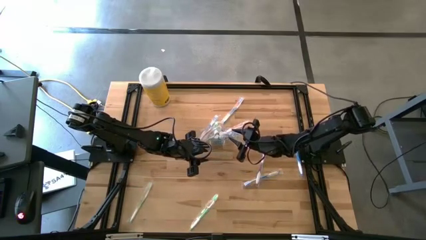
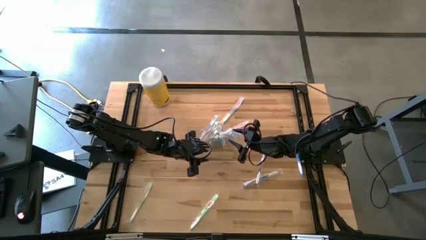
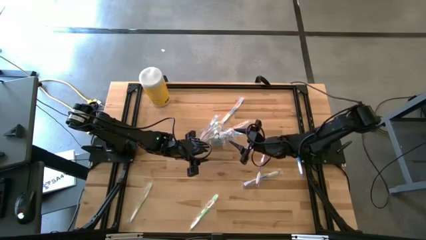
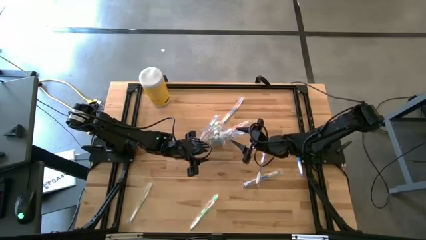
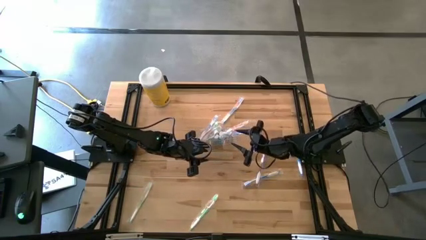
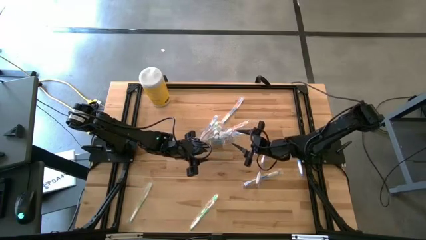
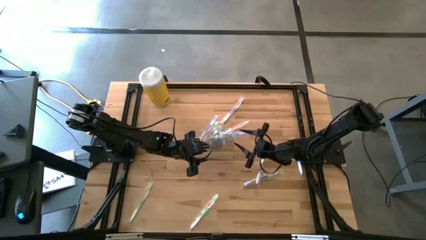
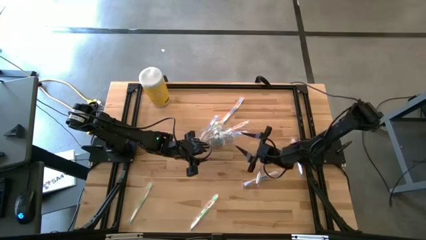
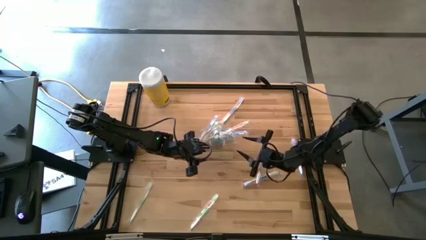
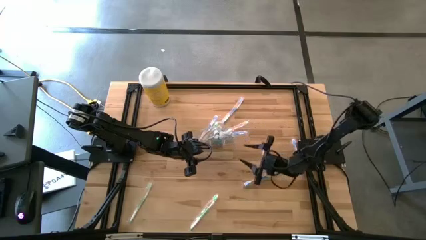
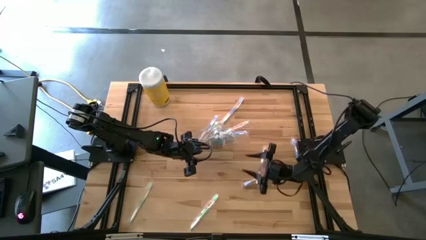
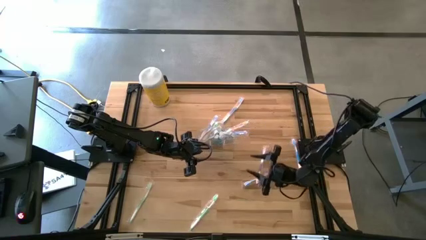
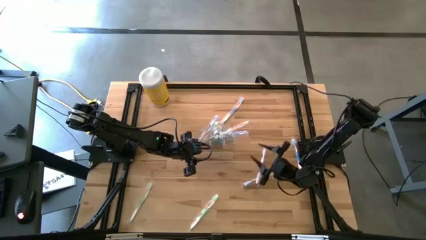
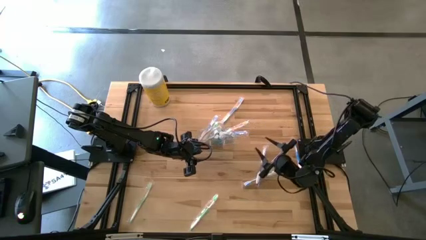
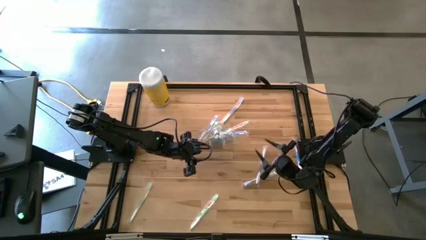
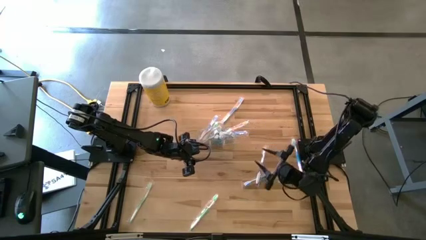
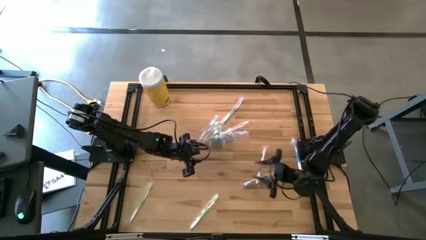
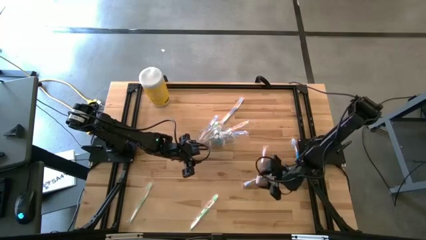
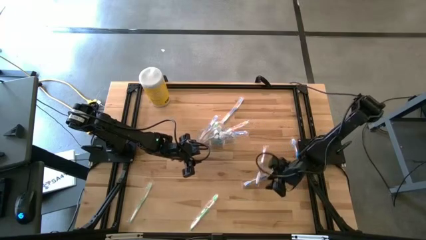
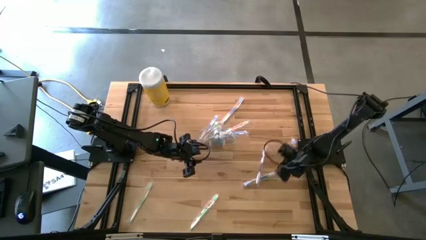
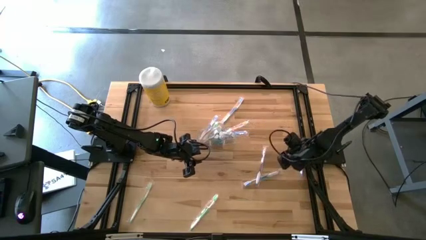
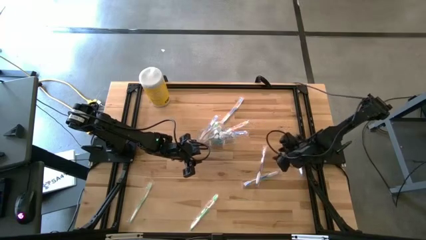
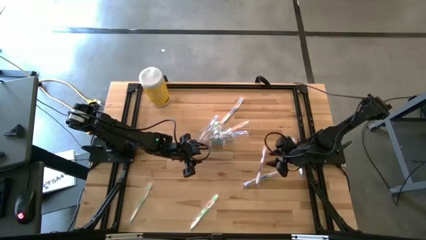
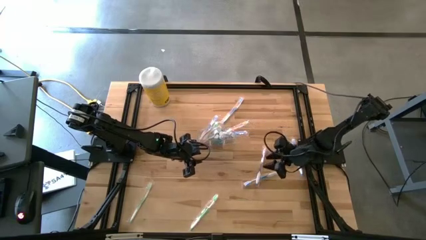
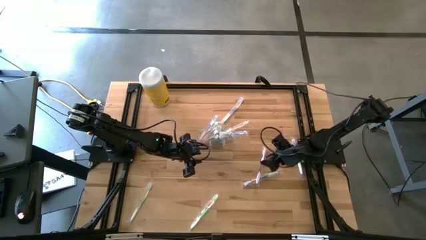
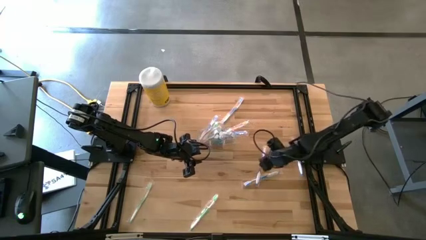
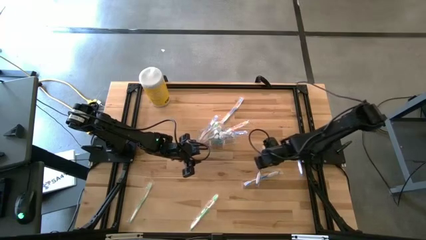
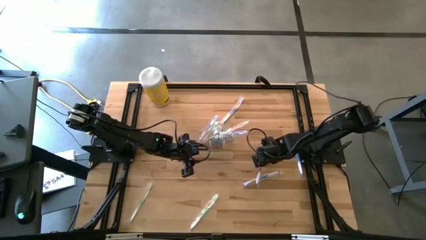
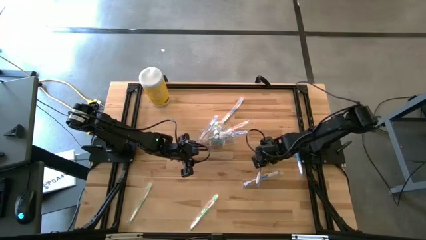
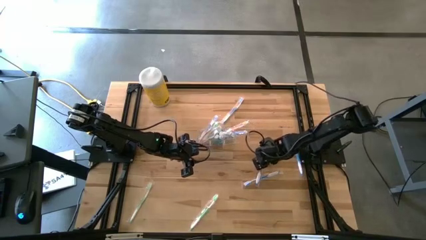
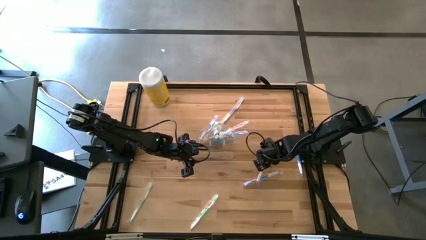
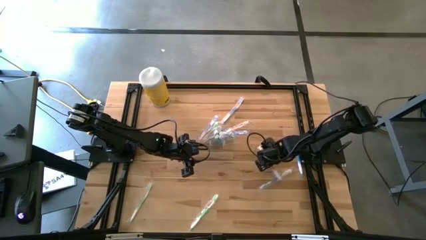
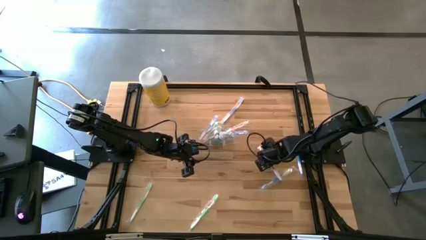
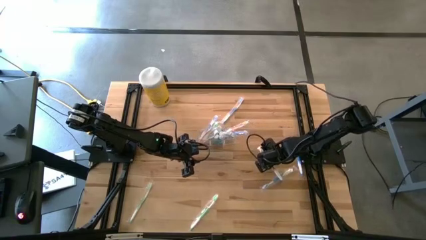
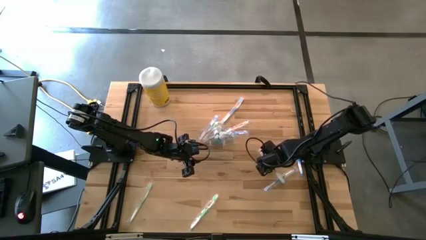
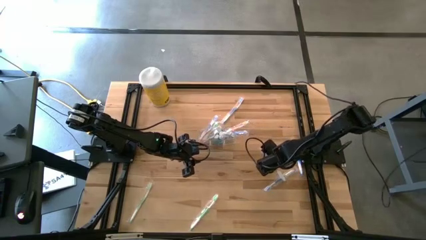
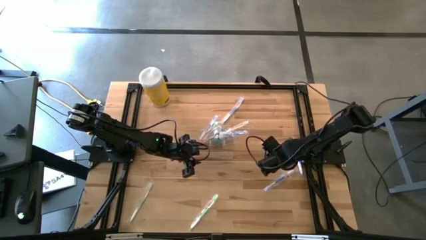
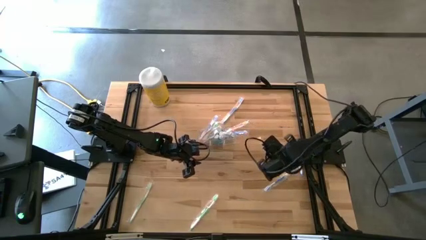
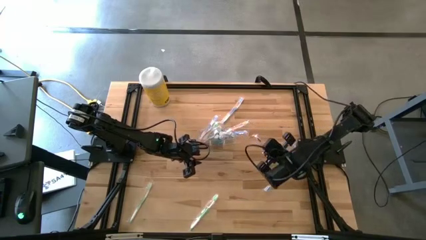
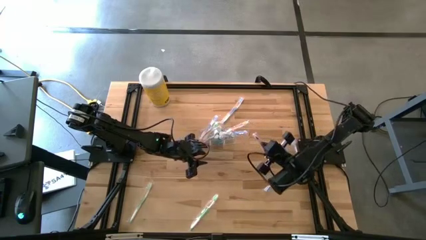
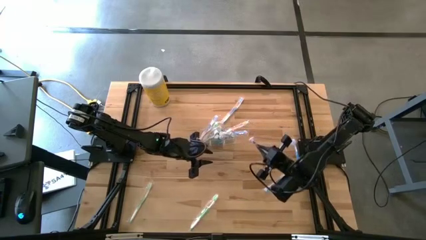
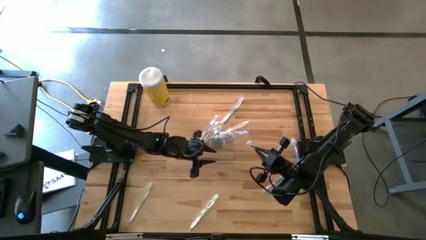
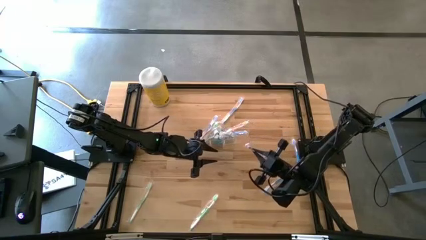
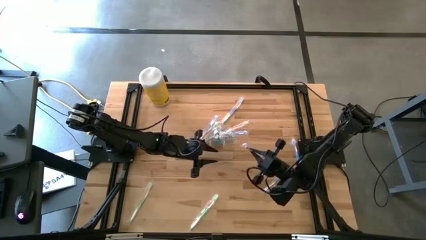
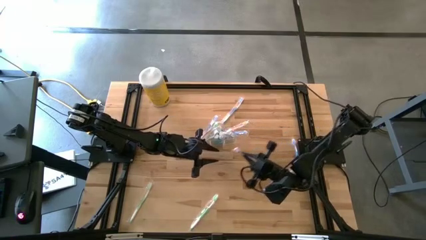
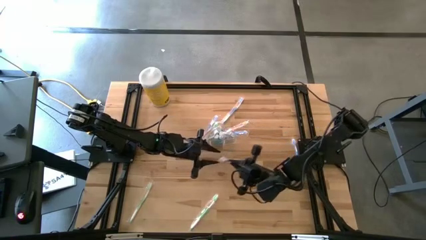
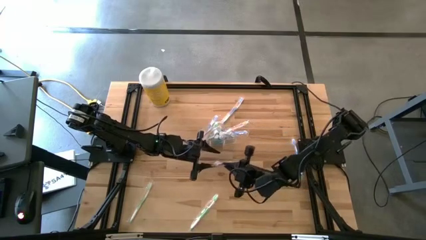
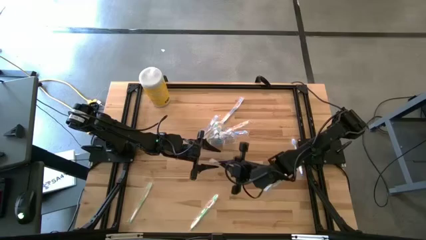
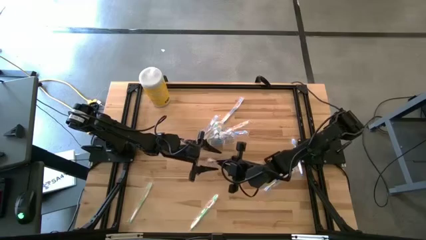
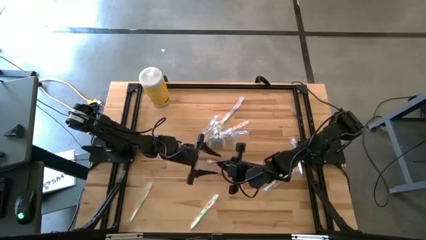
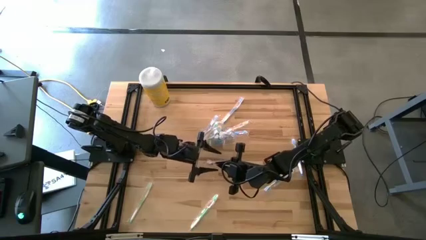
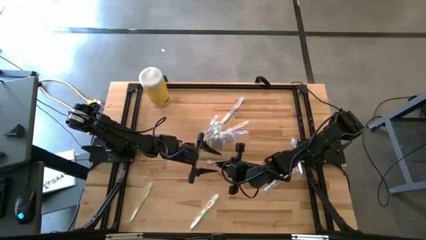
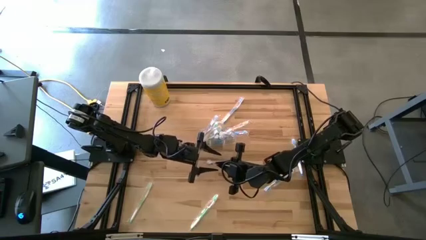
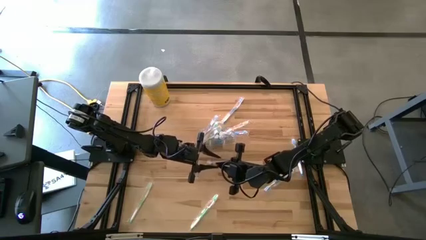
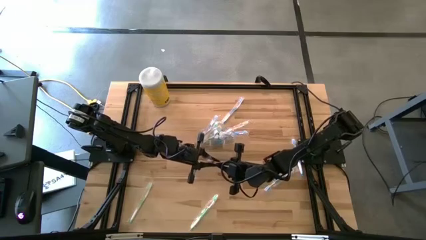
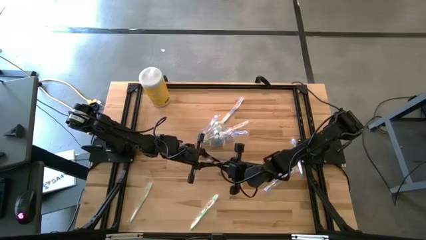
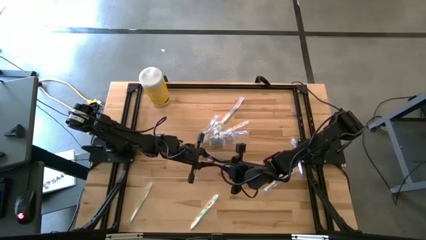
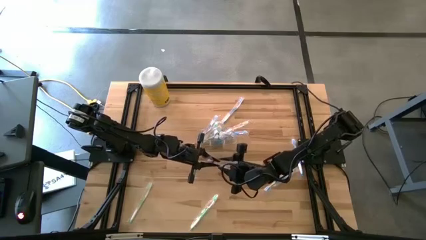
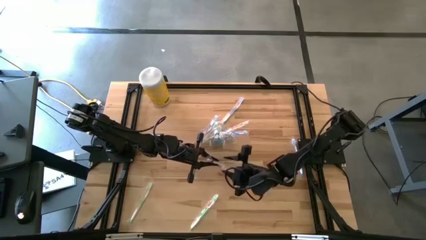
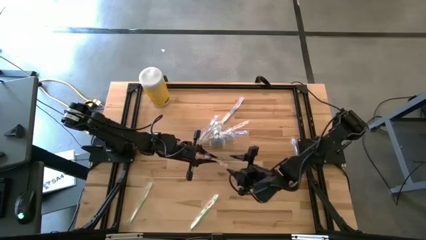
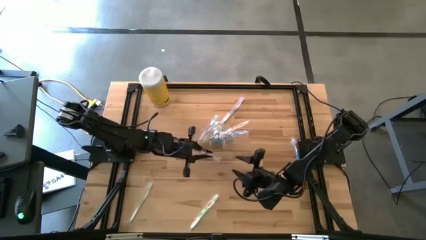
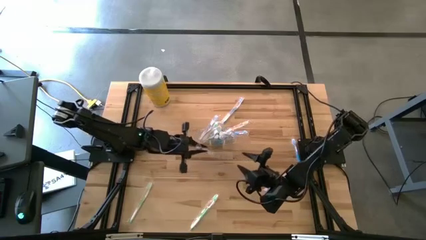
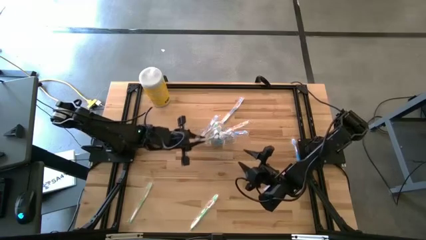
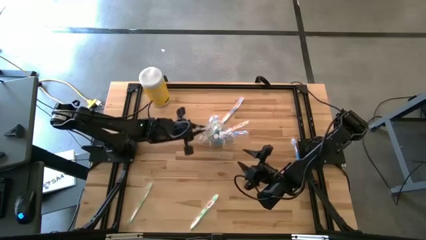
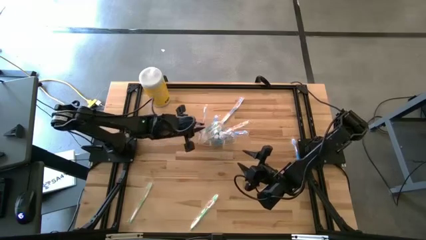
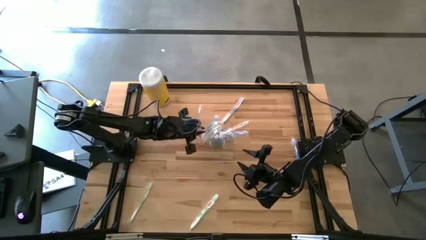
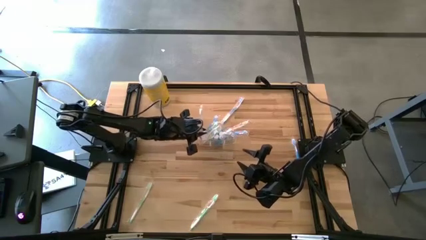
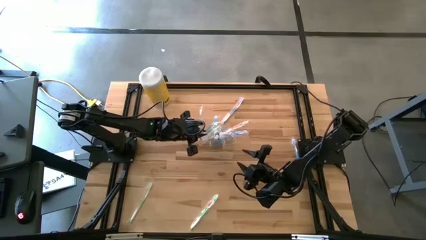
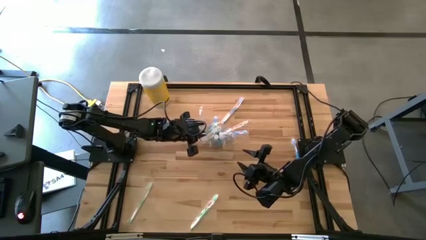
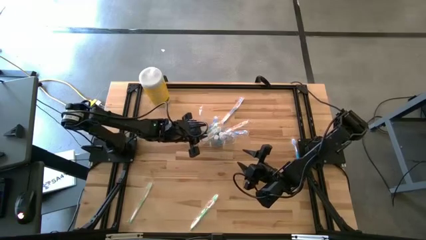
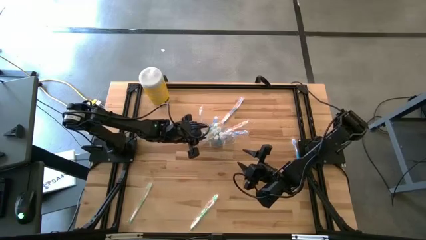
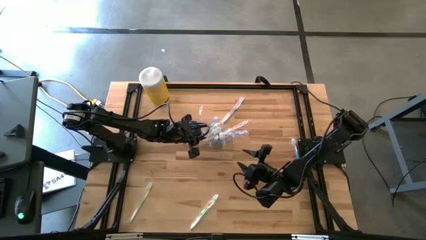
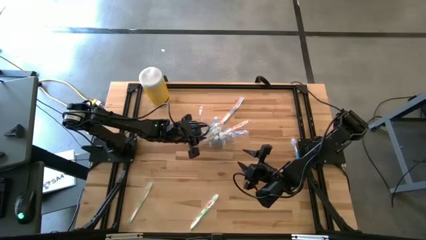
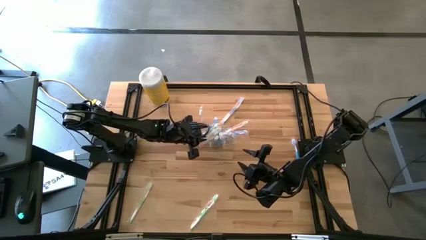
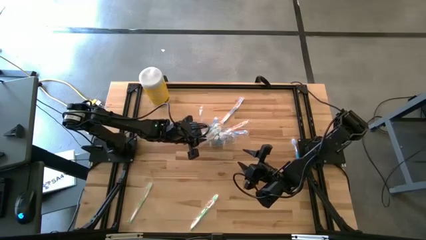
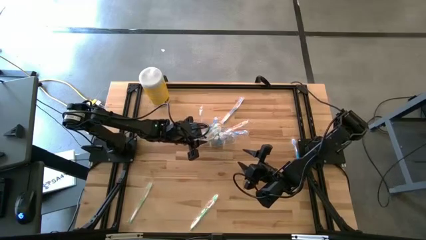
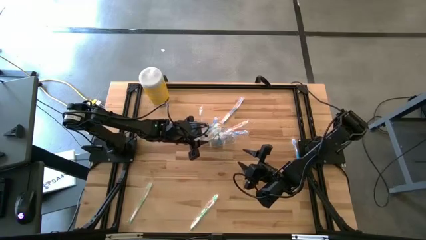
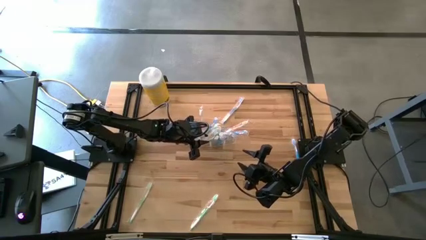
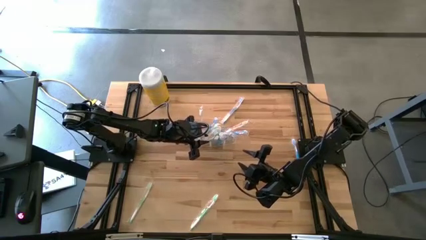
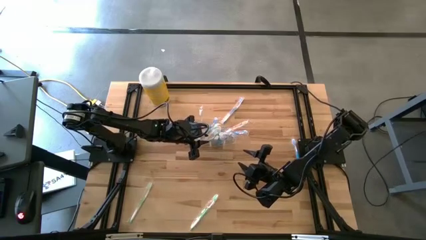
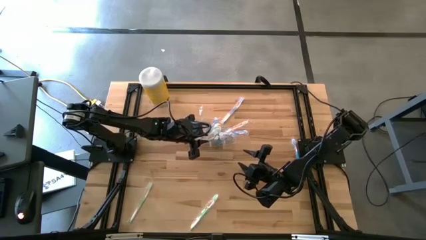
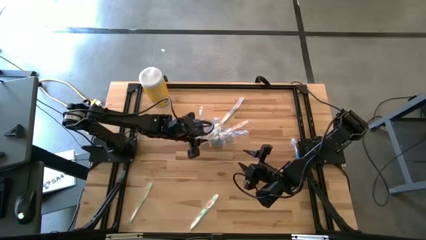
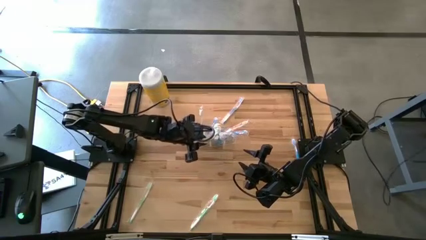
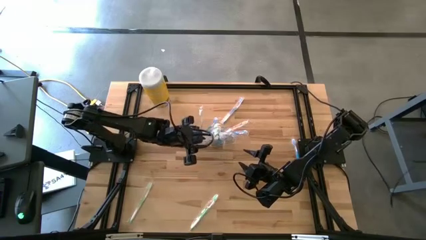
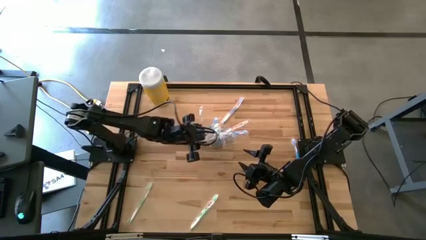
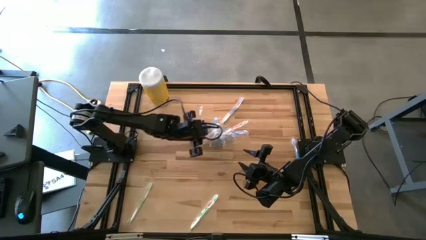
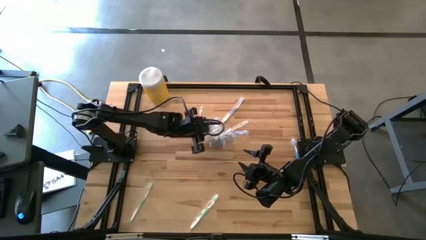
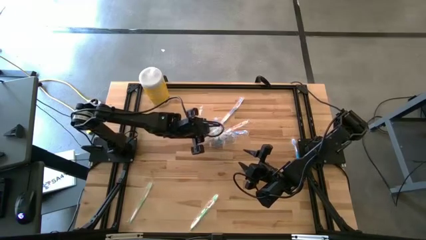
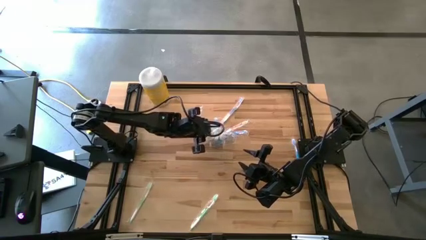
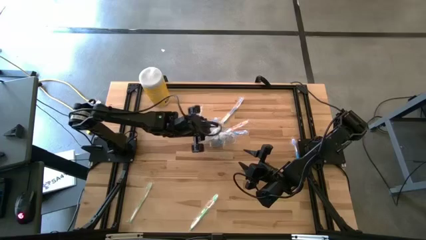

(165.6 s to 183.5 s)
Task: Pick & Place toothbrushing station
Put the purple toothbrush into the transparent organizer
